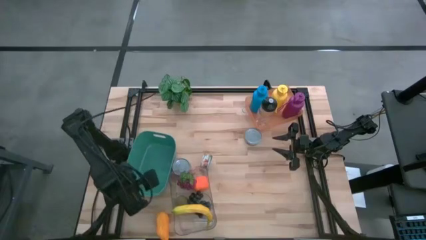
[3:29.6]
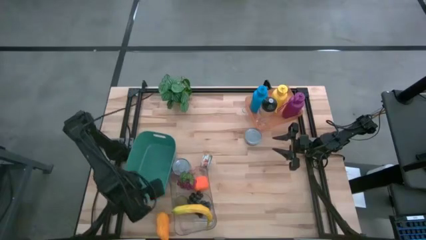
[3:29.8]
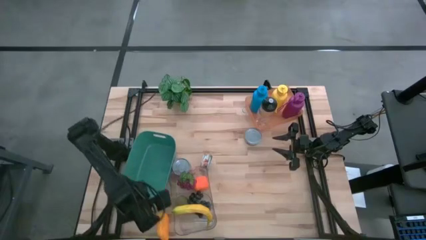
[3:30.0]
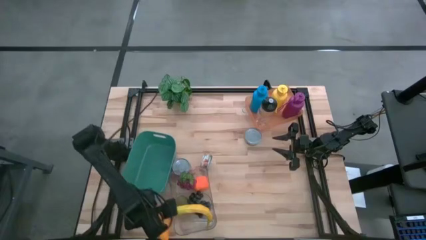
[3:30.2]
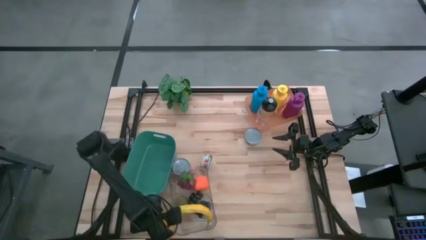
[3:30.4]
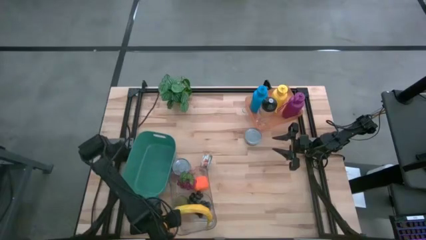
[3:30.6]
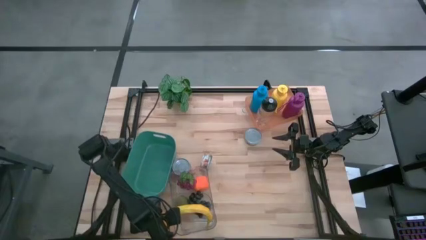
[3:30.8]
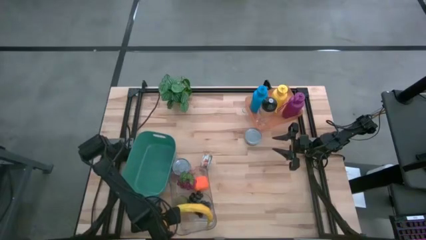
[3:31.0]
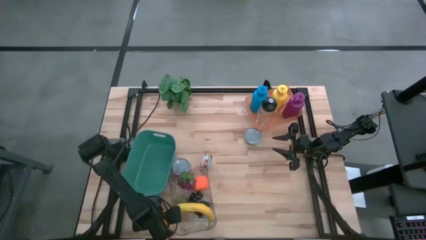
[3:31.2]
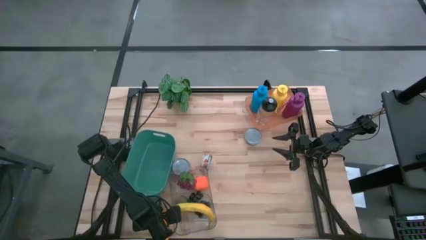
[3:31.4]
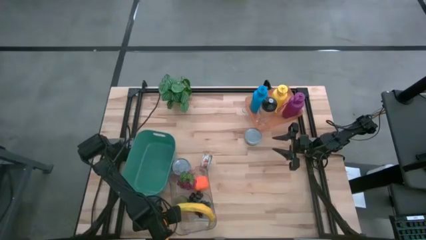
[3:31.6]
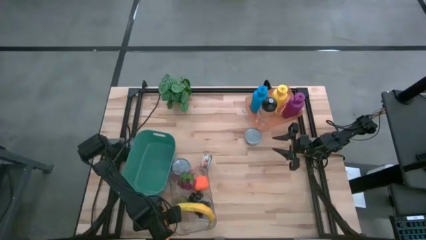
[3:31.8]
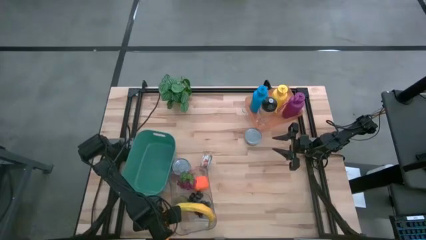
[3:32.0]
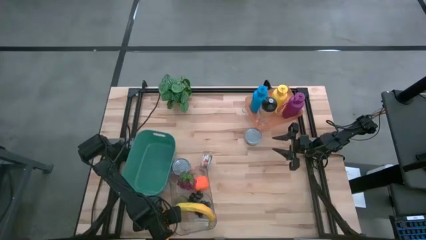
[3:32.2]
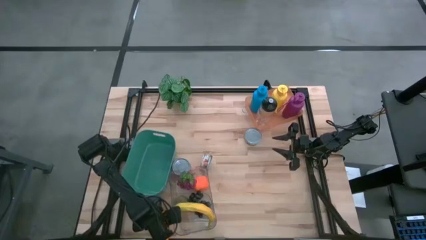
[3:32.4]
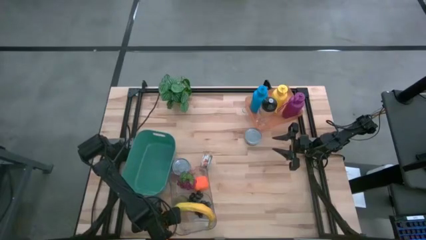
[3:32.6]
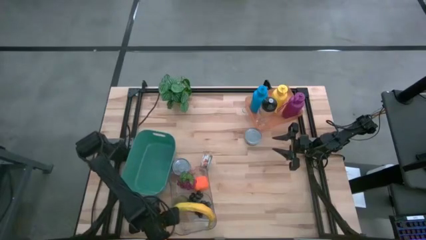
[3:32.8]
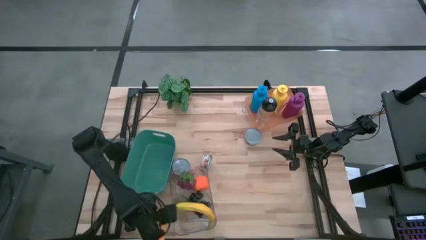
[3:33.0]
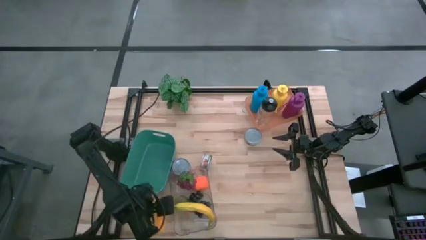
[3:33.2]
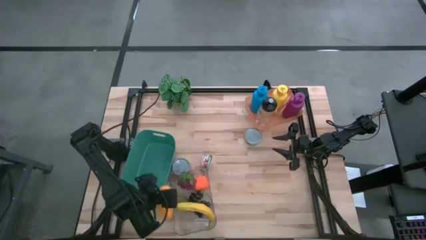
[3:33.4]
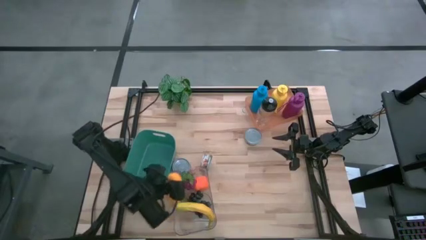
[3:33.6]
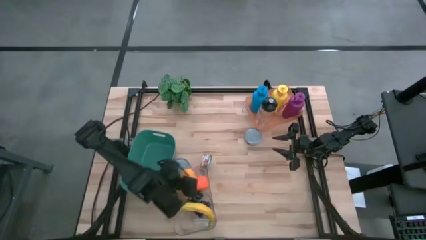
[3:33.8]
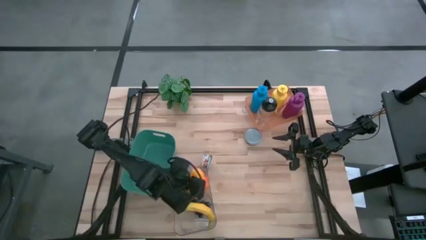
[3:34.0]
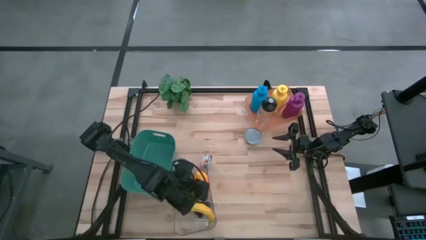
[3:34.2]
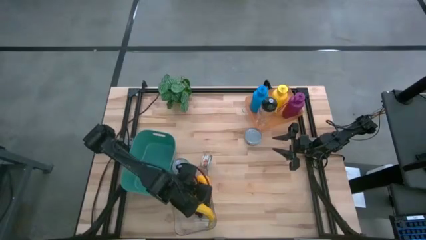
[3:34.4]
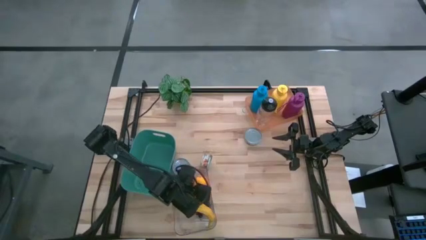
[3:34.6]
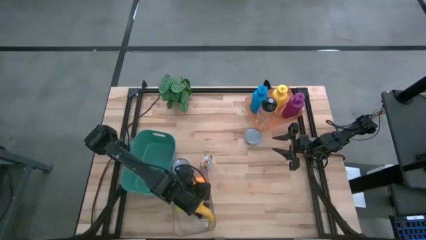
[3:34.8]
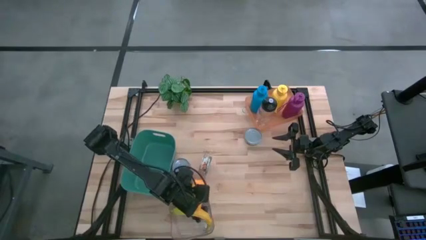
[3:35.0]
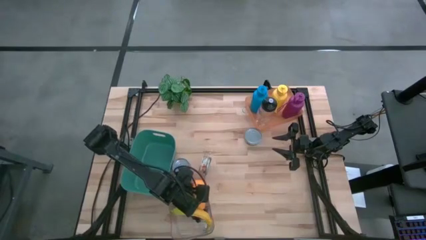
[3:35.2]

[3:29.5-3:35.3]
Task: Pick & Place Food Item
Put the mango into the transparent bin

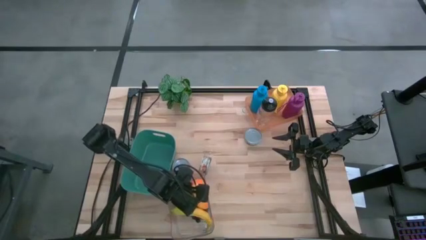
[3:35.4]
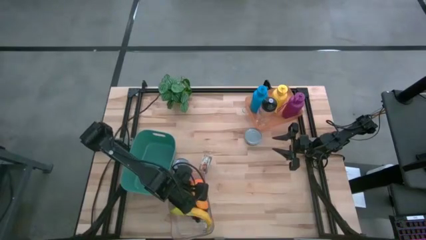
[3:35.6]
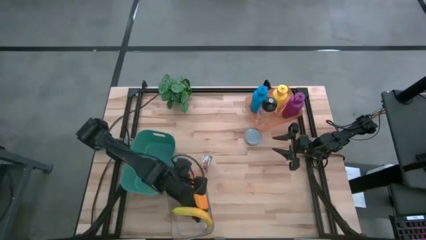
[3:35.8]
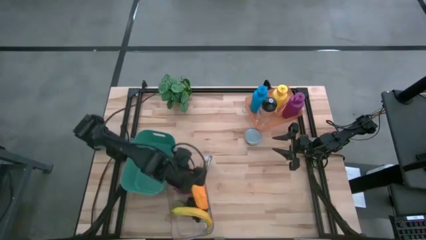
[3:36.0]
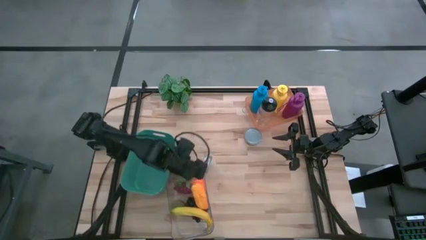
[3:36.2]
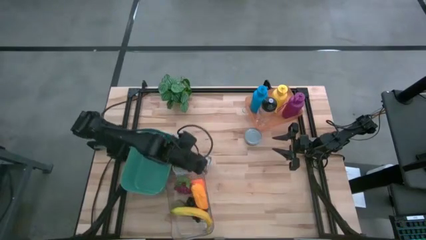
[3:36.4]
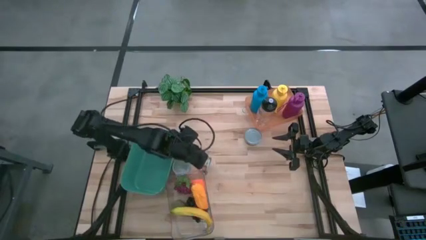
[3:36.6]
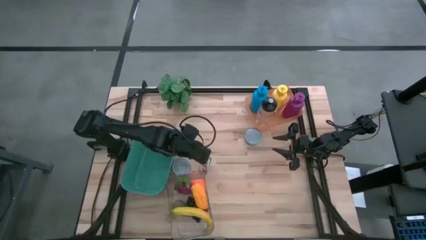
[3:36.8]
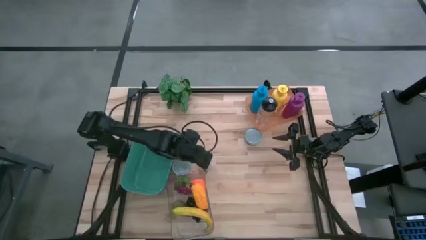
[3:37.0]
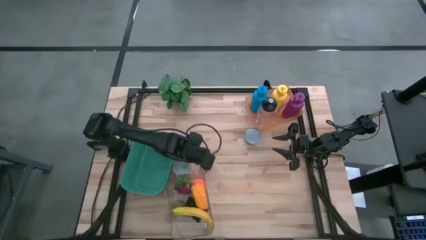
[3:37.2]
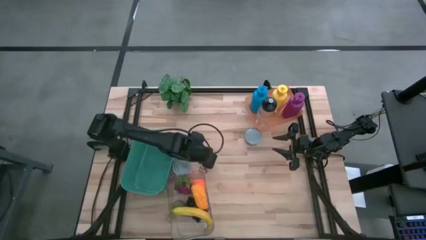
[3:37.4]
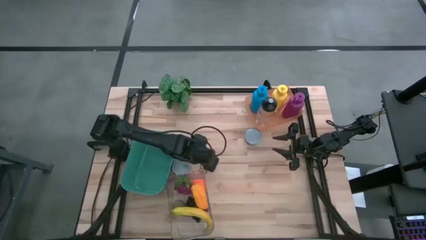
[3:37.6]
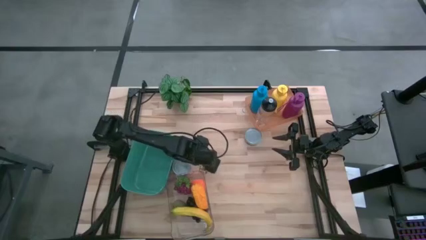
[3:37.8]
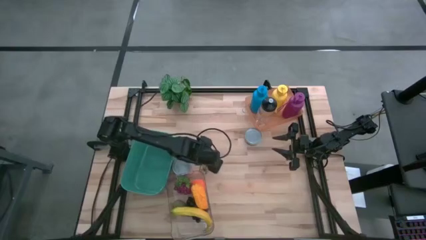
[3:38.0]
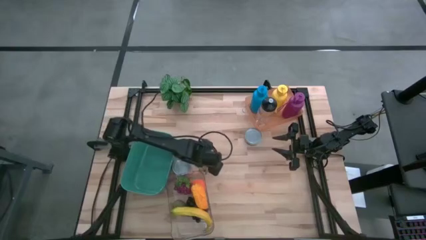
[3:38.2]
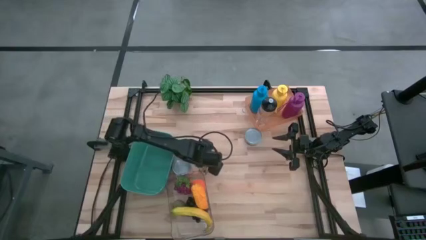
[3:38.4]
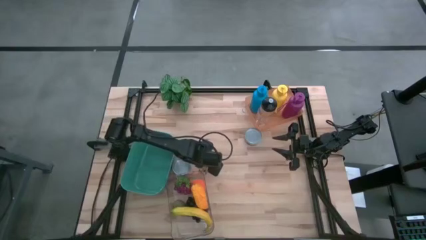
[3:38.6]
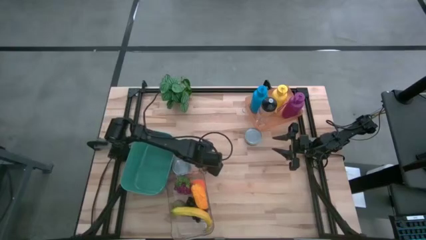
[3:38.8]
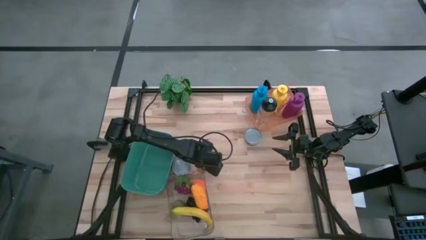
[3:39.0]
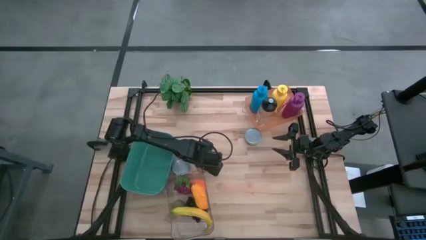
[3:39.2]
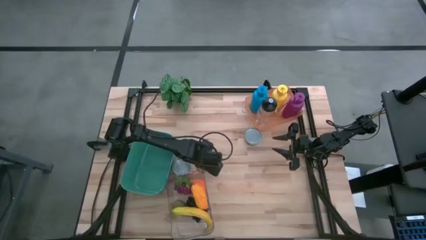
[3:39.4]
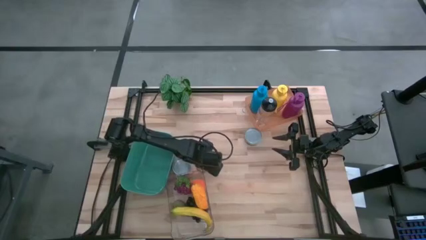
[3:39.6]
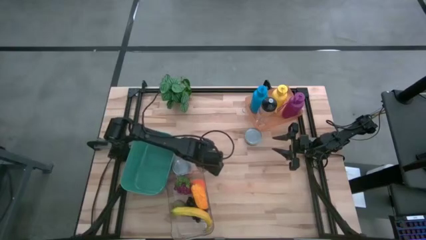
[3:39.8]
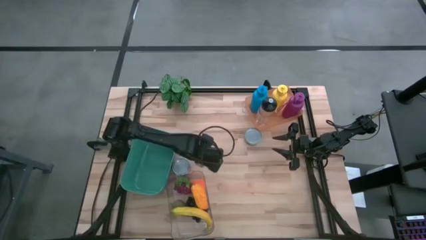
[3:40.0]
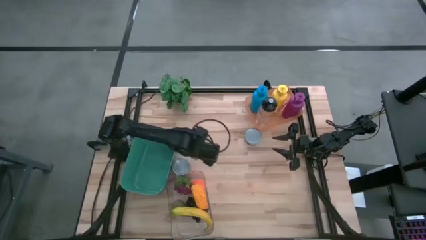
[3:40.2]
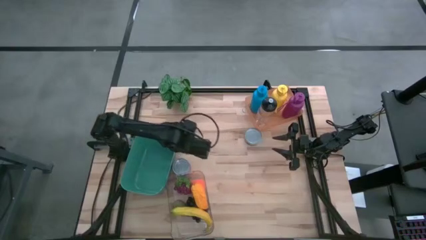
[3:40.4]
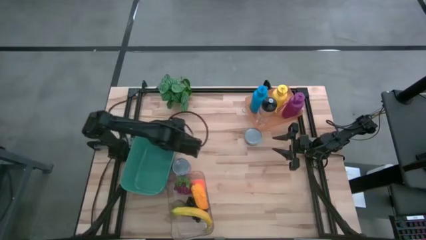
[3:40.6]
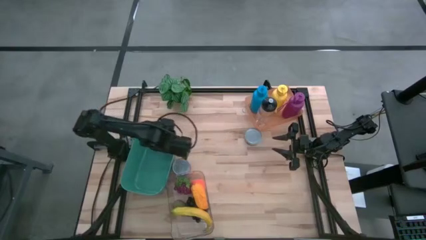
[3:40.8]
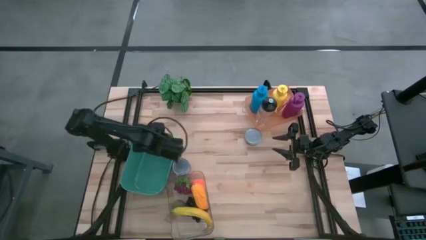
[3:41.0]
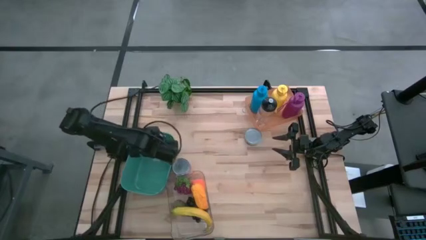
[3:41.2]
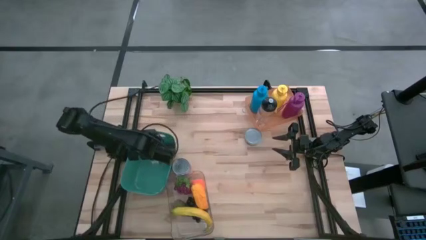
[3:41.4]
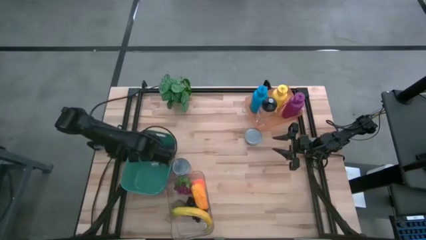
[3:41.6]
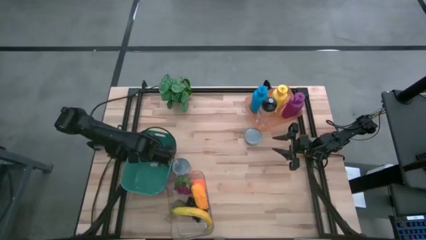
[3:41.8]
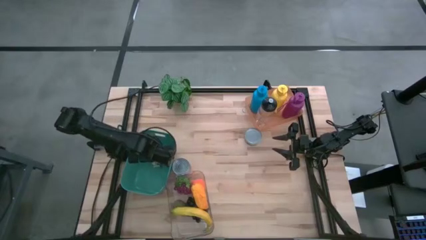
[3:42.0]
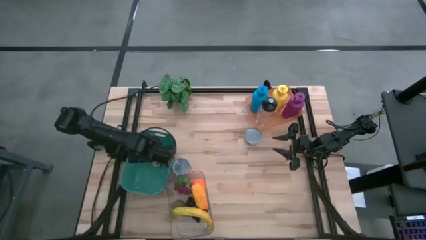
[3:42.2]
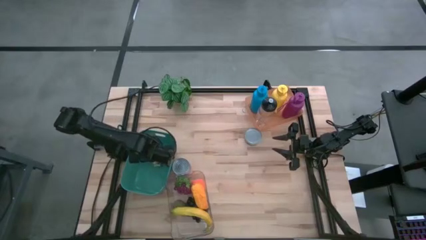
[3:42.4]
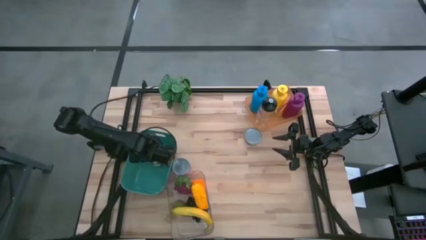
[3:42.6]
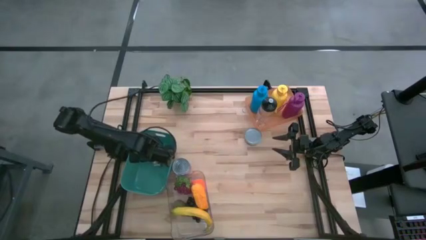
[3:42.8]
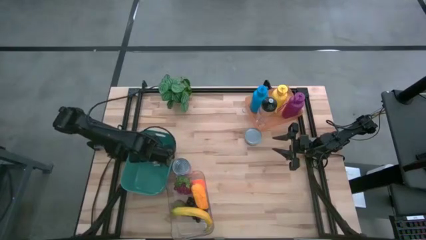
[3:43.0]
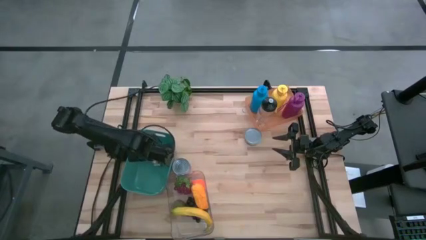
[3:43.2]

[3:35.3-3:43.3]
Put the bottom green tuna can into the blue bin

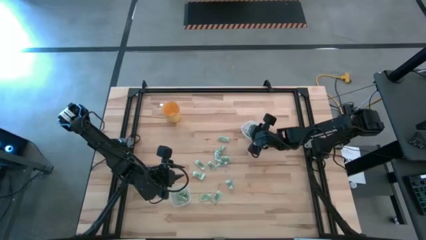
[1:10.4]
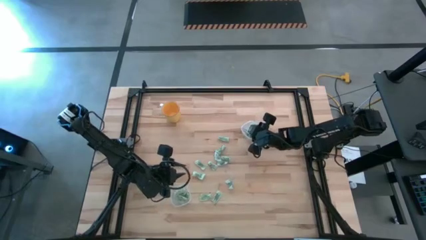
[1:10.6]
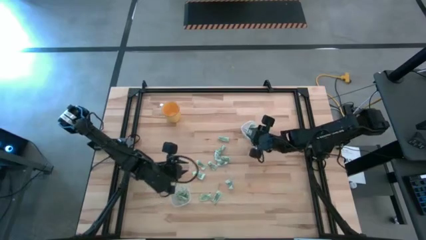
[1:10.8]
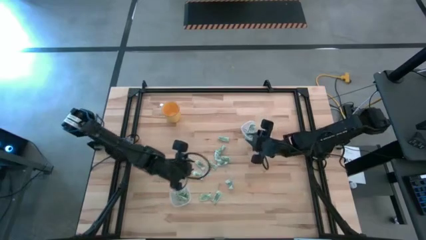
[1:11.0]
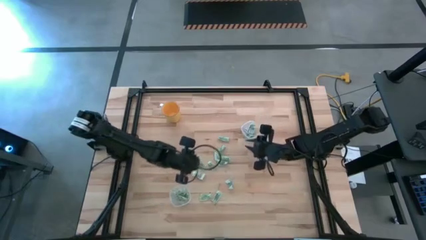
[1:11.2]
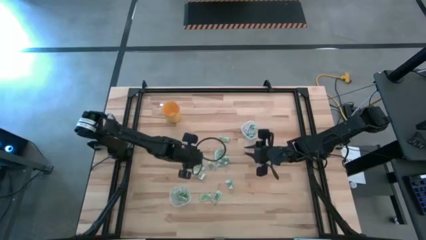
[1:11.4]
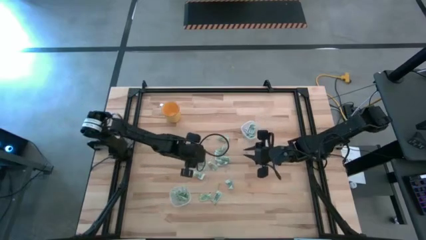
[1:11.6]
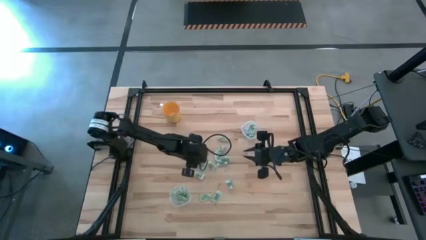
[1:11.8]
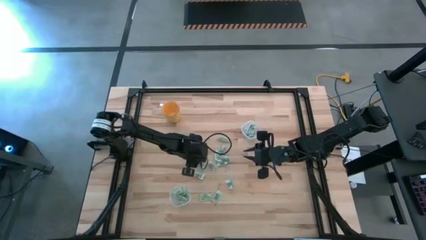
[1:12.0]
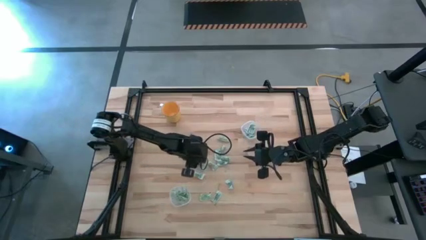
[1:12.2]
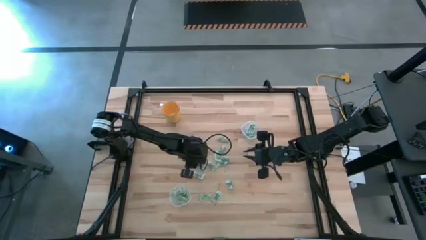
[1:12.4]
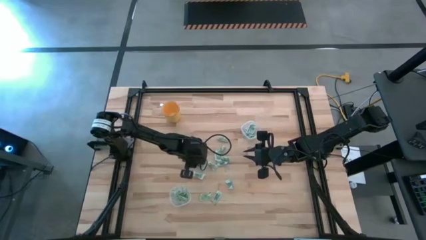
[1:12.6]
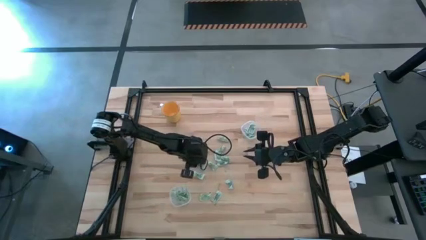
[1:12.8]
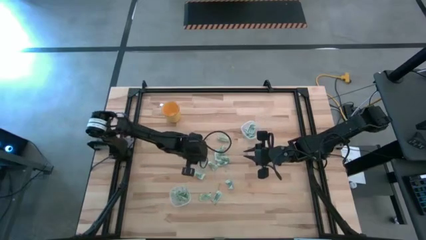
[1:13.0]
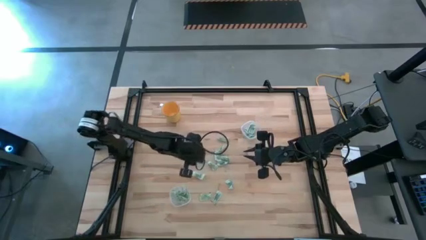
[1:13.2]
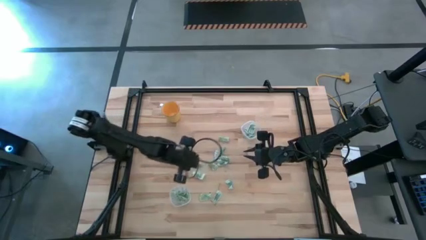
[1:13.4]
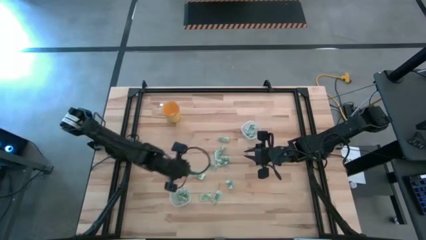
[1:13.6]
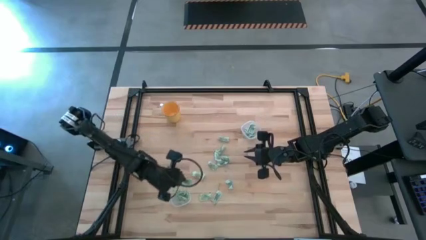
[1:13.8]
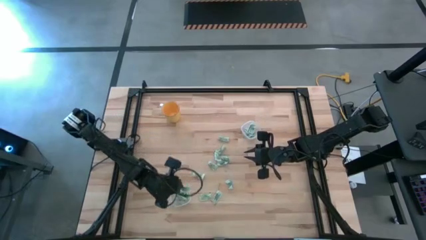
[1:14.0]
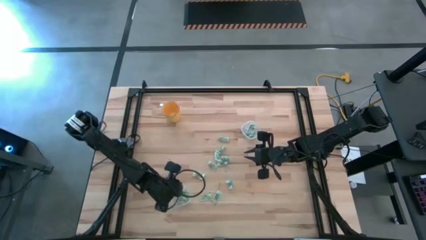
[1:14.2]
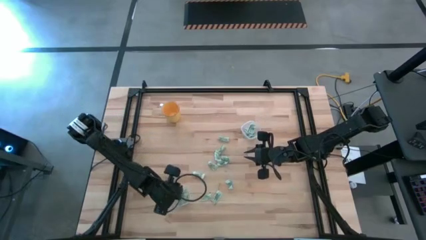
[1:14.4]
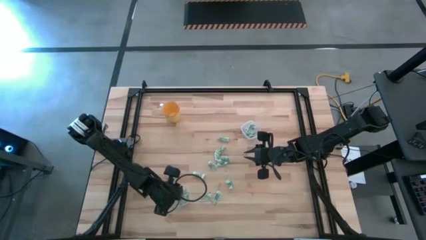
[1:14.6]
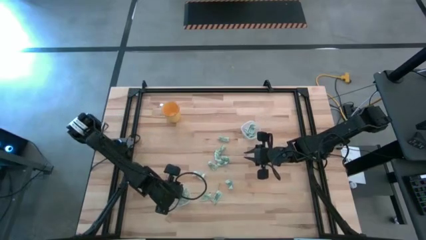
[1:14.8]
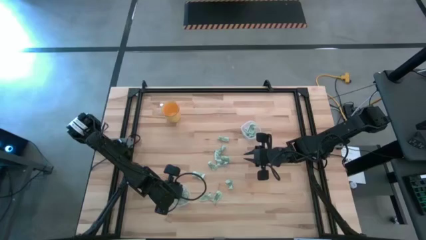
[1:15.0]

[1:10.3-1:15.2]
Task: Pick and place Stevia / Truvia into bins
Put the green stevia packet into the bottom transparent container
